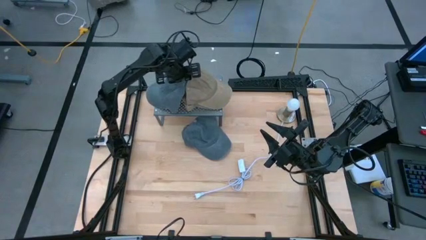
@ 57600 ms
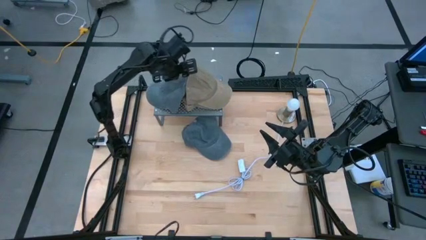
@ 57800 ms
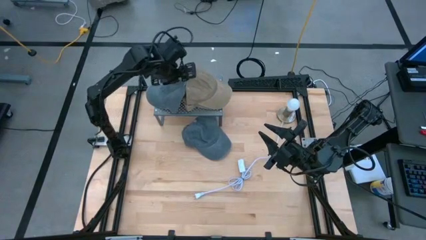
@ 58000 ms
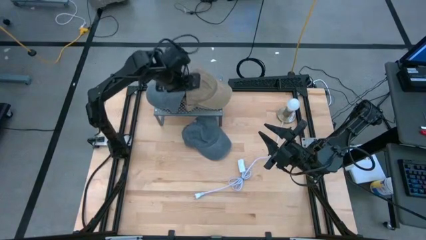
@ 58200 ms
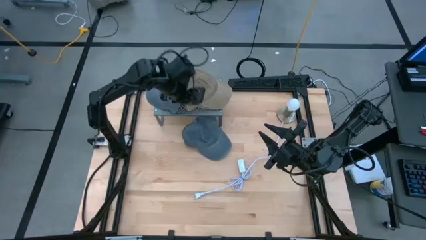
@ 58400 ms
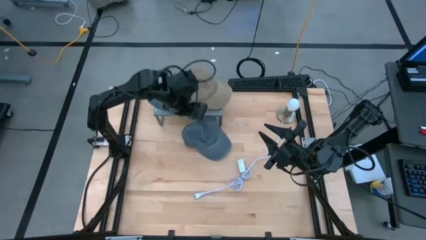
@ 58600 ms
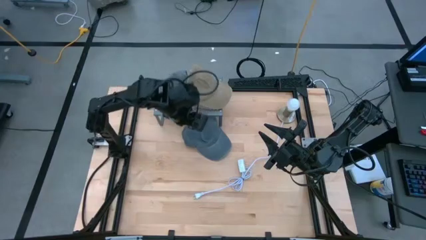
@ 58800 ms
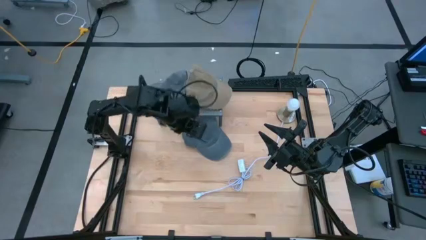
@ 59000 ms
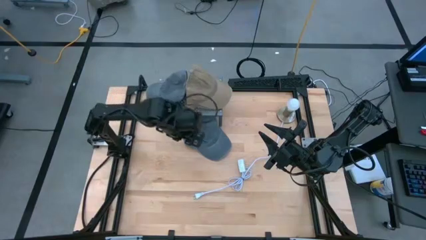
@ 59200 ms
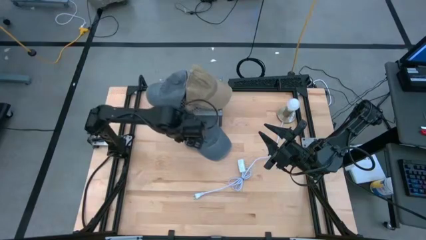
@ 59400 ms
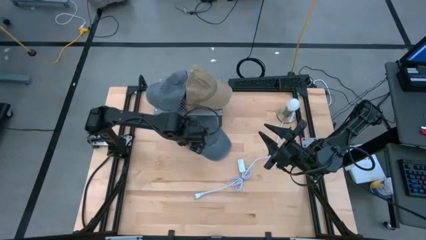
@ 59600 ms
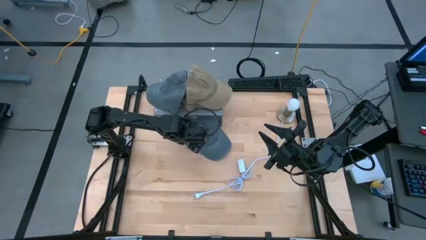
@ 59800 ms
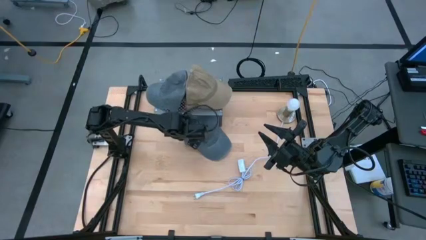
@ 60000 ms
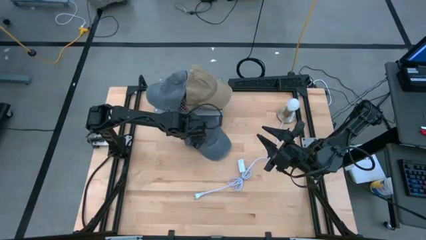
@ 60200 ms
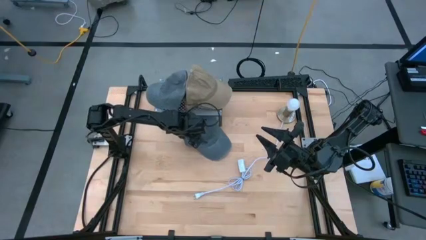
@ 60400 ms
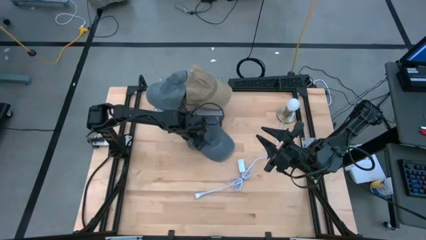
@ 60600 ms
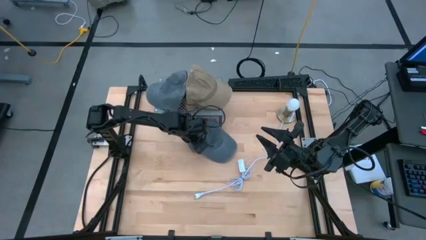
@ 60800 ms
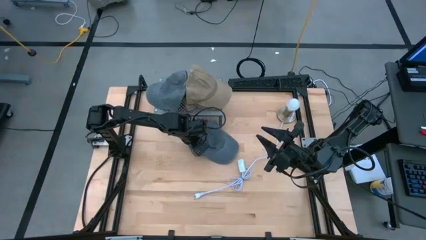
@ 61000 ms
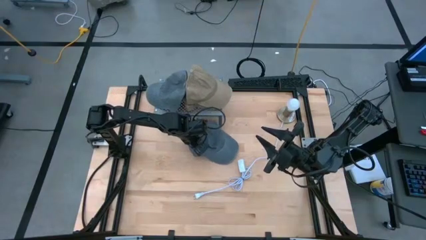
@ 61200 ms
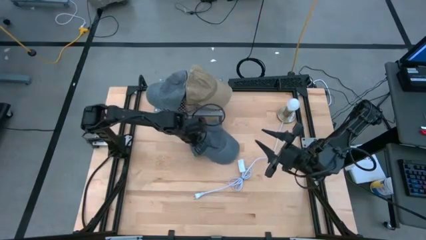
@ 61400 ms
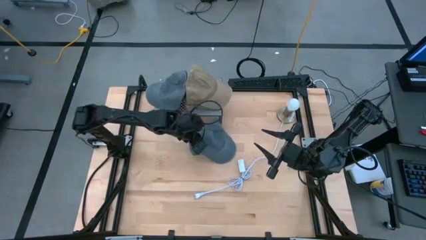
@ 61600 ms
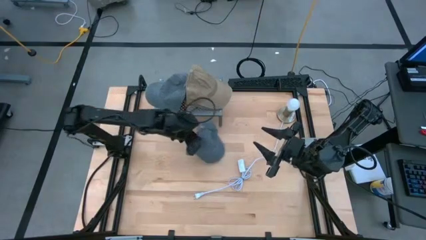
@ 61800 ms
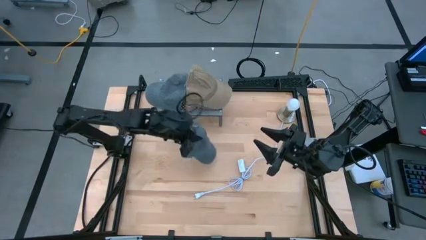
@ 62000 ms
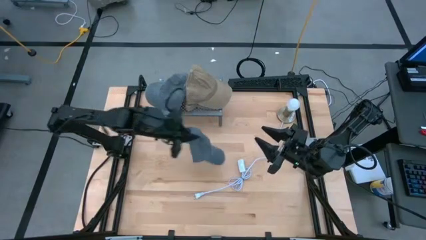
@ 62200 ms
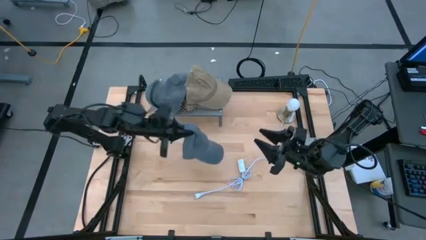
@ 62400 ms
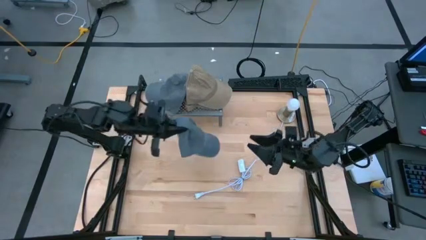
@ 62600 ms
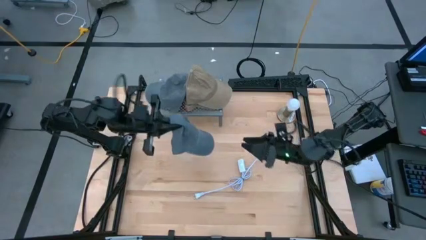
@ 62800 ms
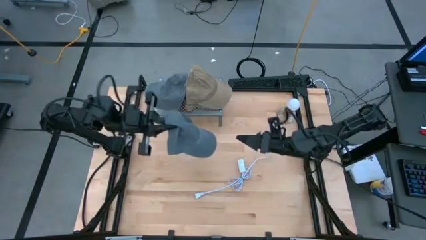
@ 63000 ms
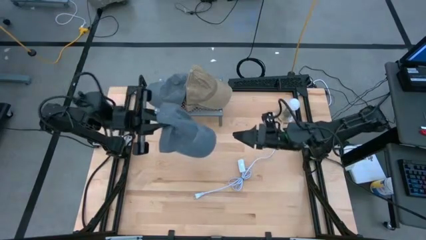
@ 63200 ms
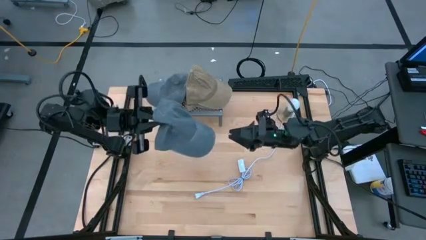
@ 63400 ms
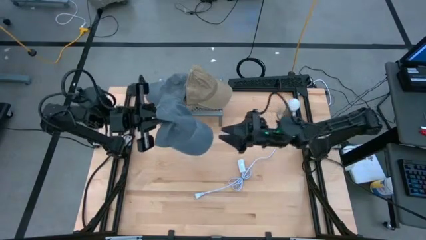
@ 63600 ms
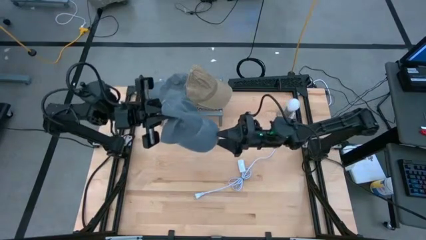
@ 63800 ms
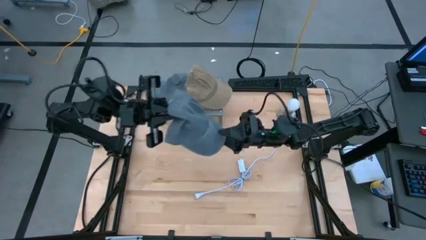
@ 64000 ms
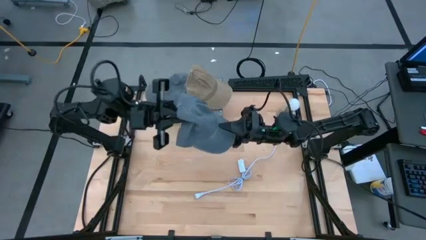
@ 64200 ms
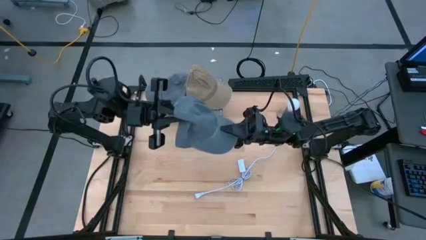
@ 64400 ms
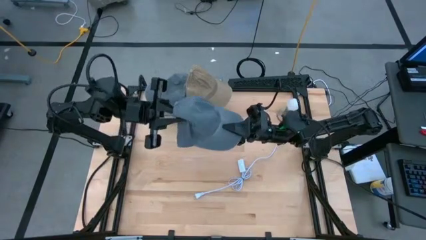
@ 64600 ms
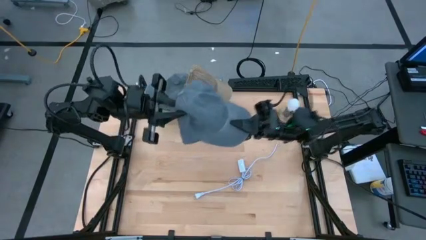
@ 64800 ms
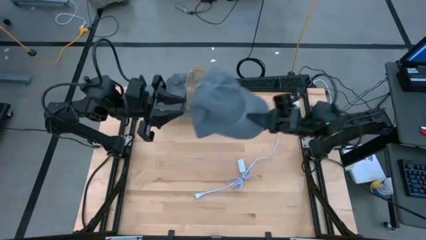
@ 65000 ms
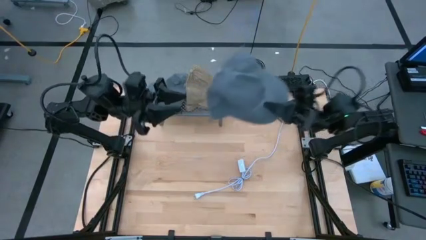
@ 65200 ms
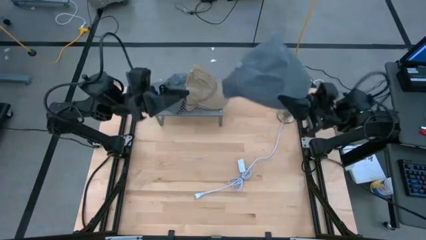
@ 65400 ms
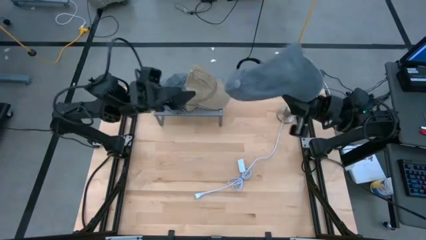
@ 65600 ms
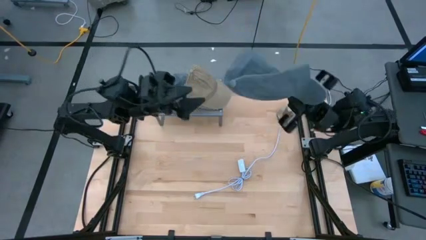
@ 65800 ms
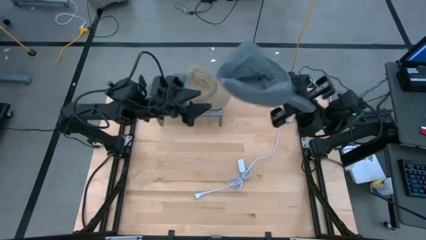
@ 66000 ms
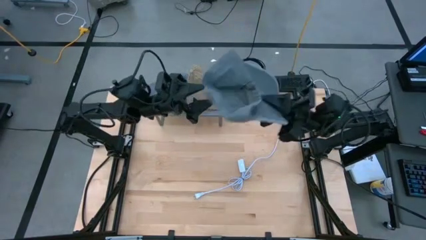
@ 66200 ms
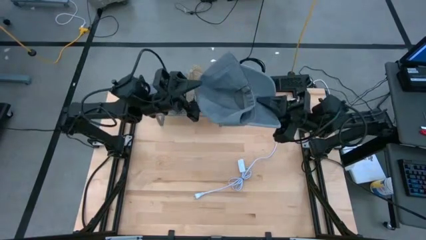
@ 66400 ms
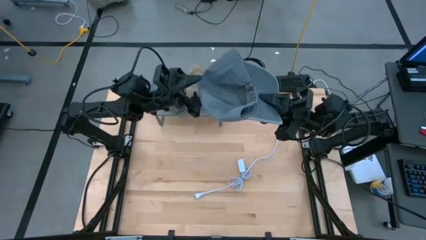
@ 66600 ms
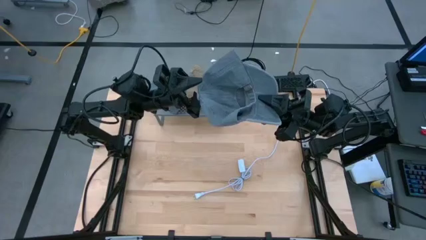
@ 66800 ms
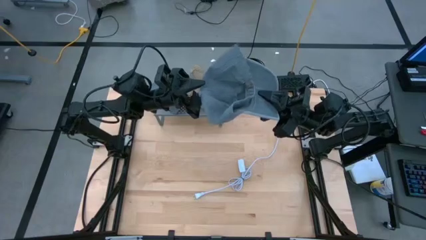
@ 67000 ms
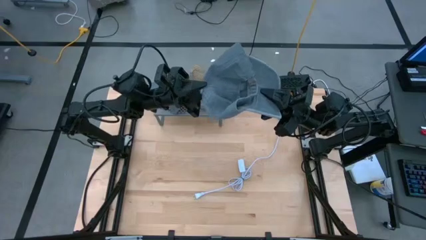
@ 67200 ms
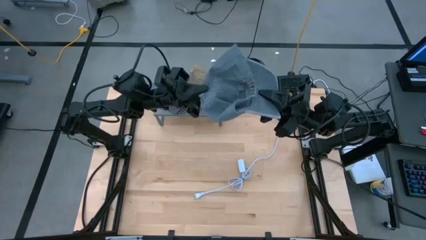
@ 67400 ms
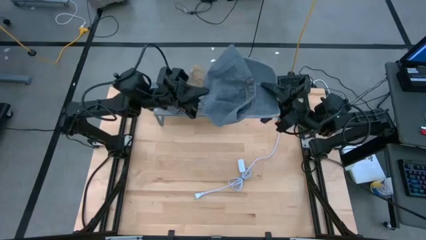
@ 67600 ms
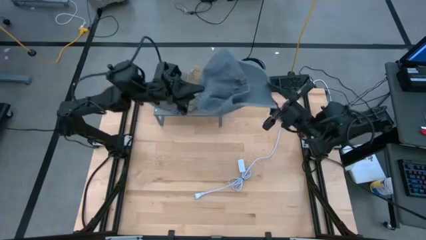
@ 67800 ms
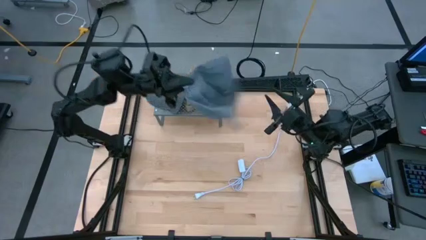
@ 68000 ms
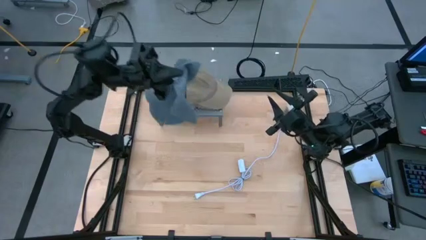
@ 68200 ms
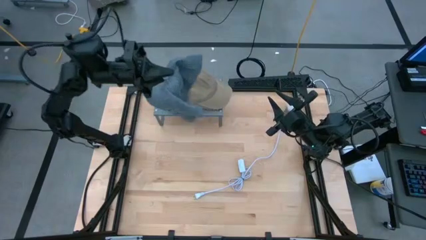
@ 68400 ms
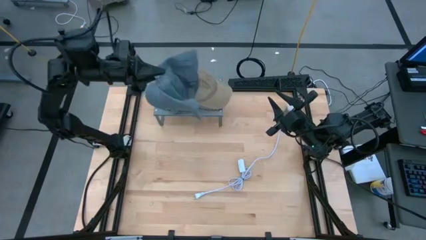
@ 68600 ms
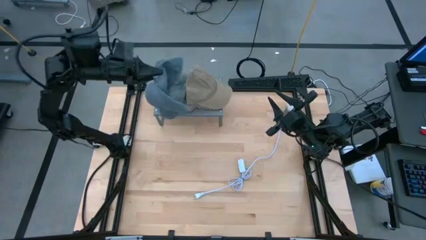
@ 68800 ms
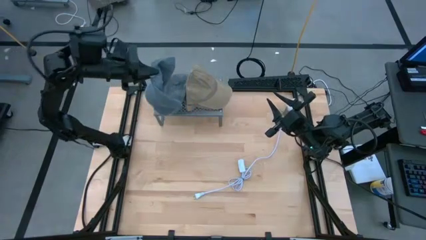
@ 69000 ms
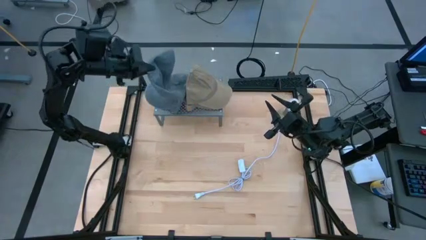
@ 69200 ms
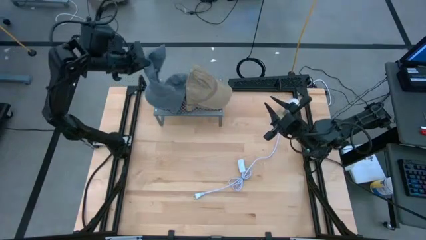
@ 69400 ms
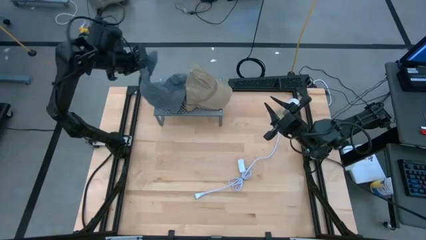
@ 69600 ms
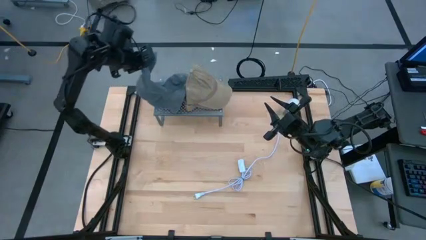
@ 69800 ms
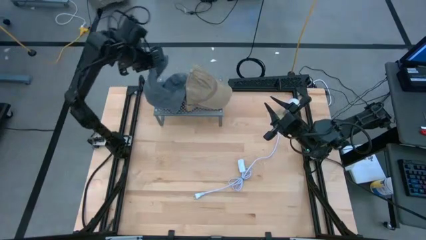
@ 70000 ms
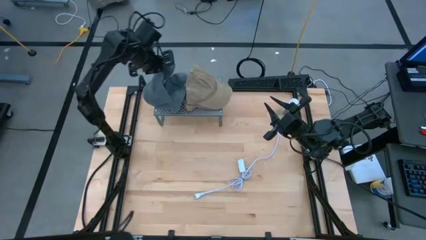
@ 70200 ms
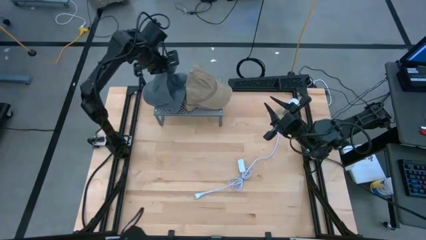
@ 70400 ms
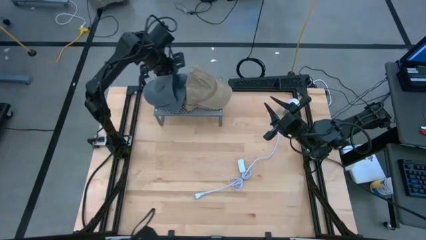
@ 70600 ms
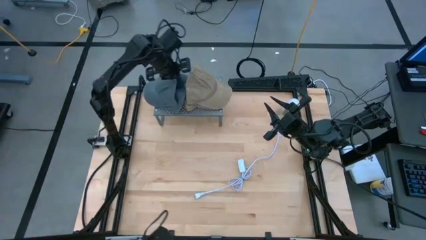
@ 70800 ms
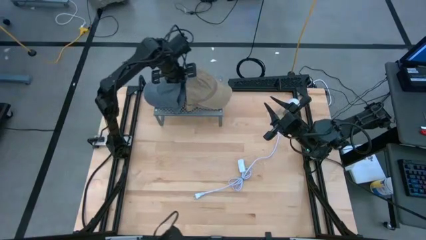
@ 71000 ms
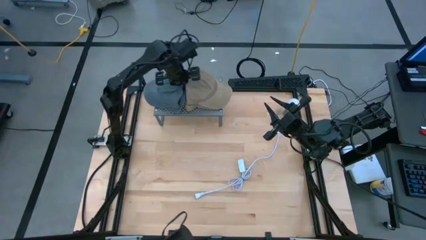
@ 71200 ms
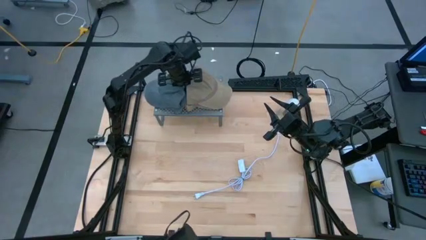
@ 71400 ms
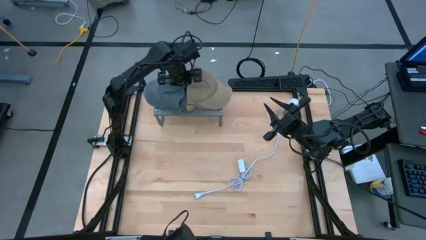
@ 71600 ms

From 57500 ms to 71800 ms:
Task: Pick & Place hat
Stack the gray cap on top of the gray cap on the shelf
